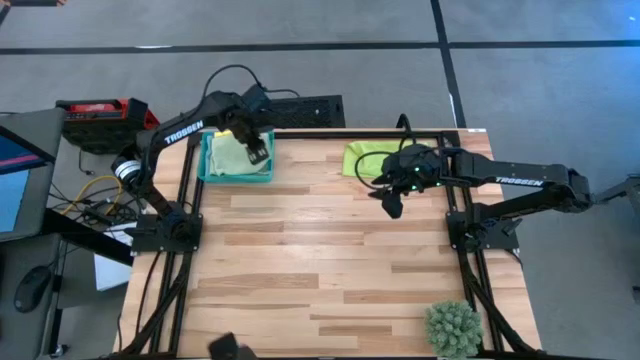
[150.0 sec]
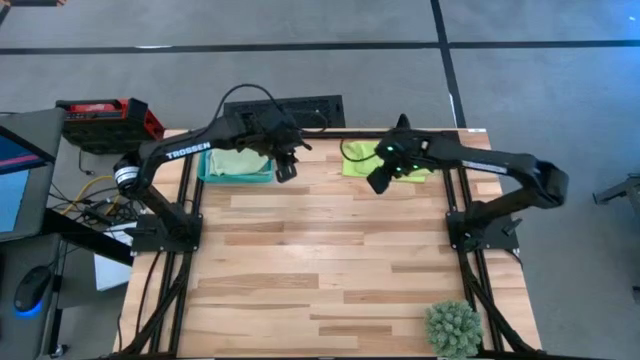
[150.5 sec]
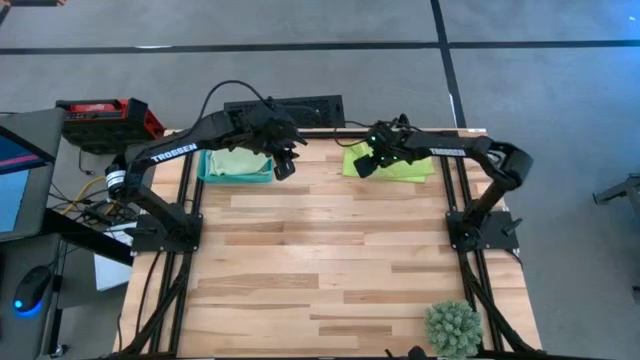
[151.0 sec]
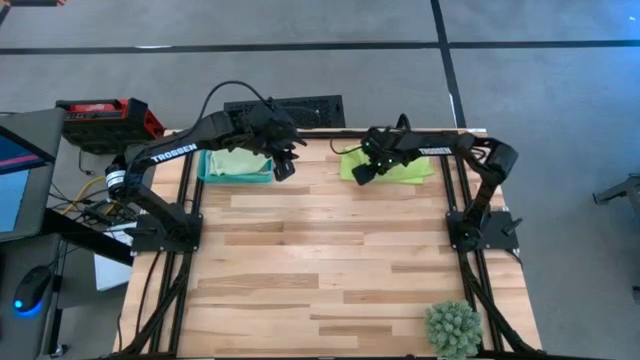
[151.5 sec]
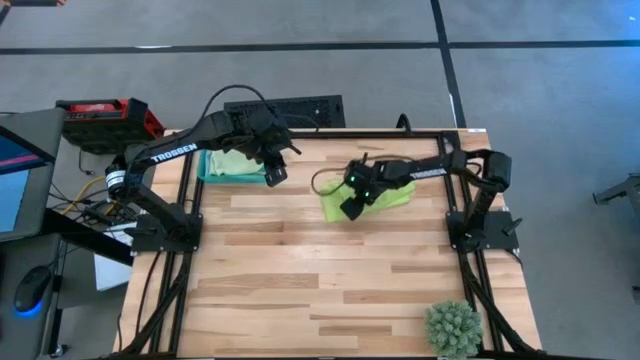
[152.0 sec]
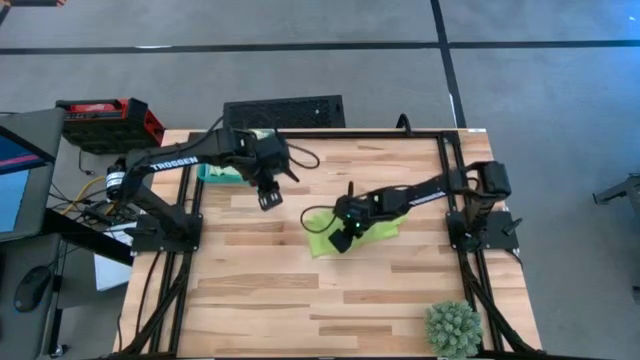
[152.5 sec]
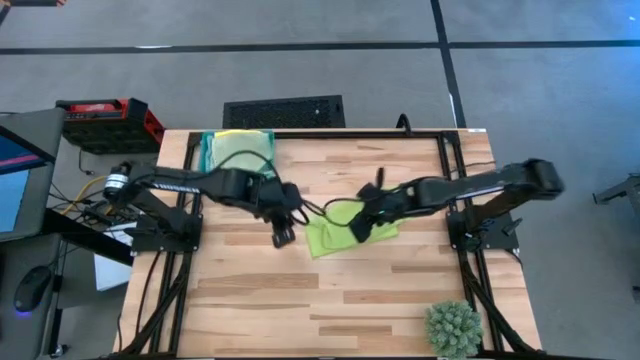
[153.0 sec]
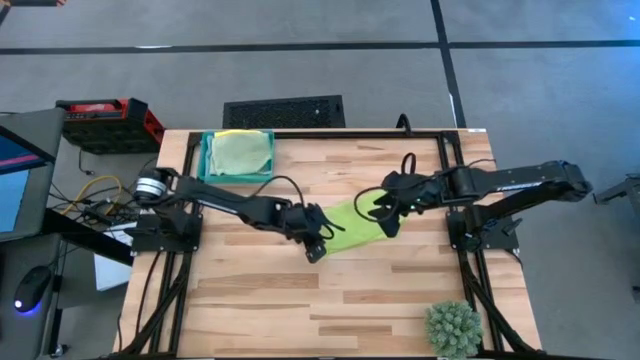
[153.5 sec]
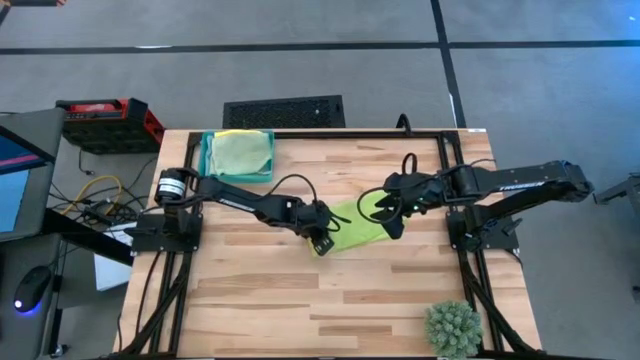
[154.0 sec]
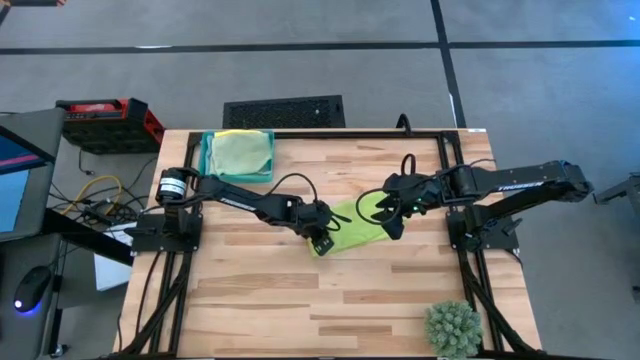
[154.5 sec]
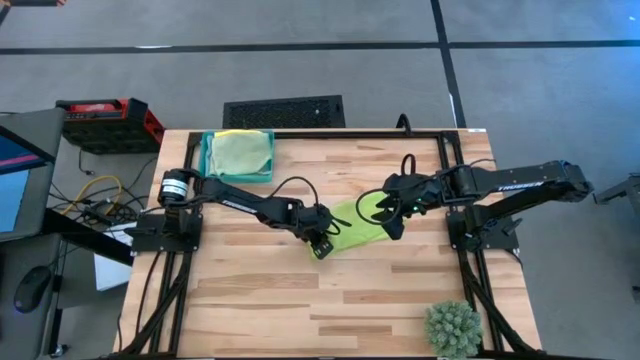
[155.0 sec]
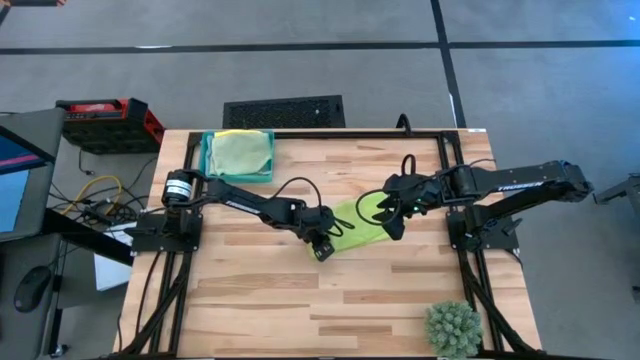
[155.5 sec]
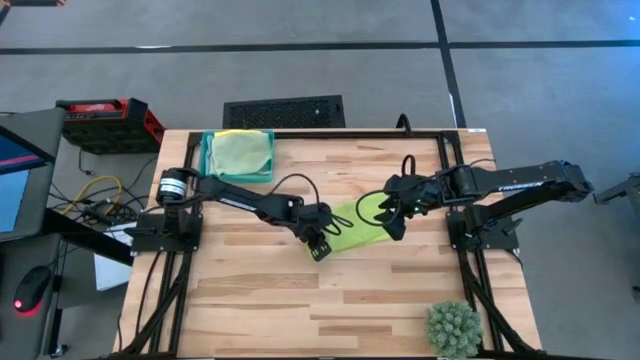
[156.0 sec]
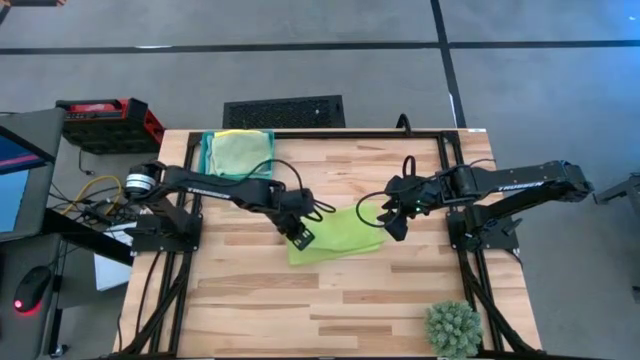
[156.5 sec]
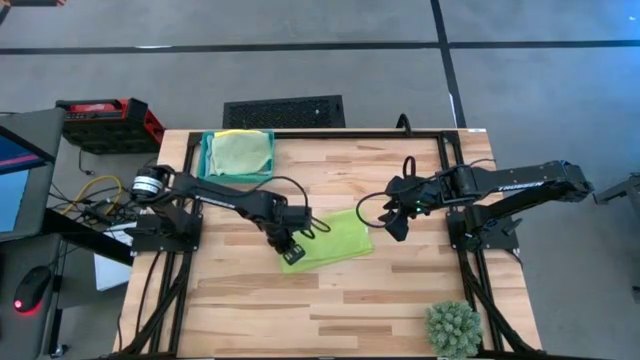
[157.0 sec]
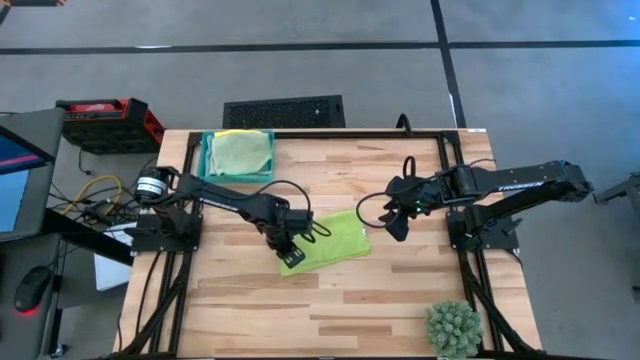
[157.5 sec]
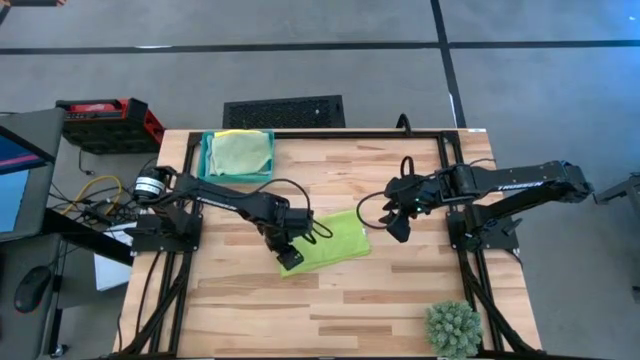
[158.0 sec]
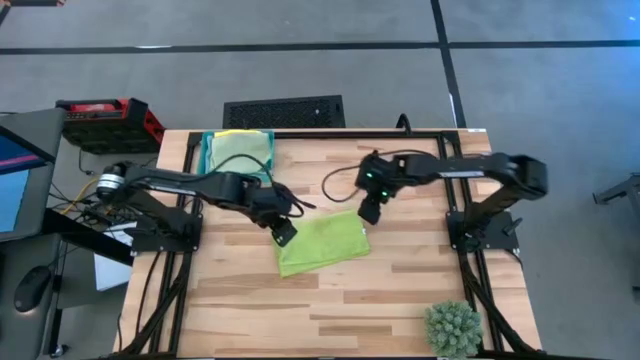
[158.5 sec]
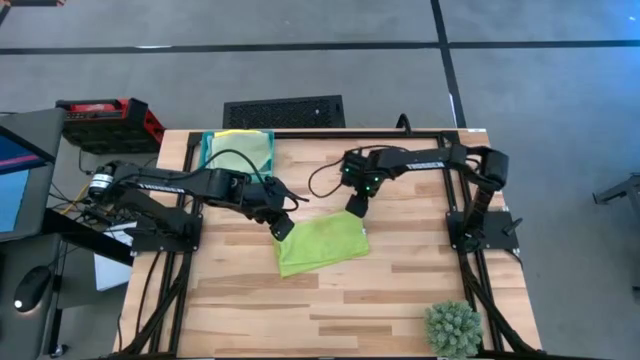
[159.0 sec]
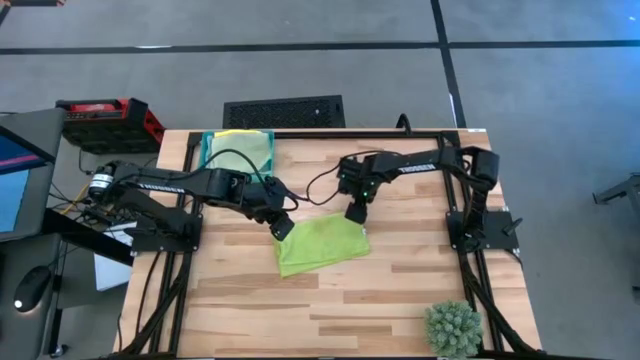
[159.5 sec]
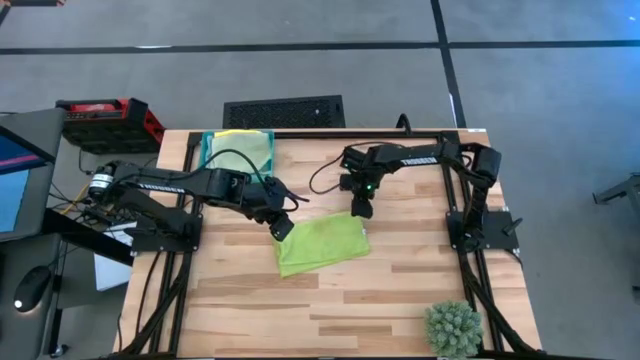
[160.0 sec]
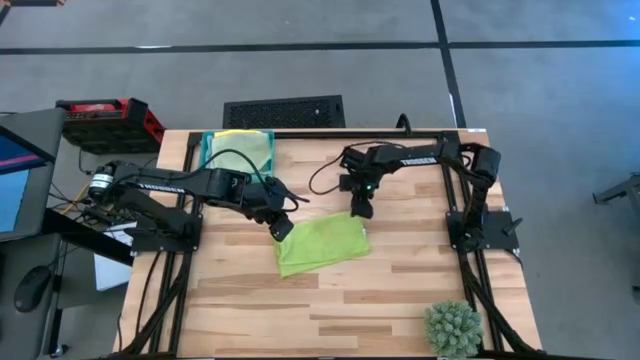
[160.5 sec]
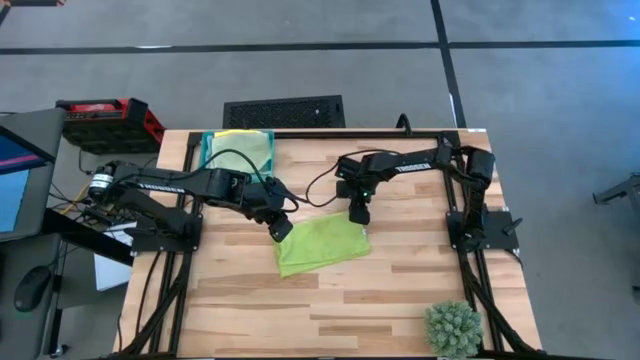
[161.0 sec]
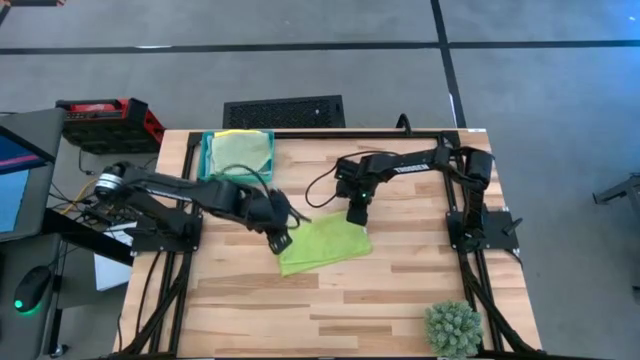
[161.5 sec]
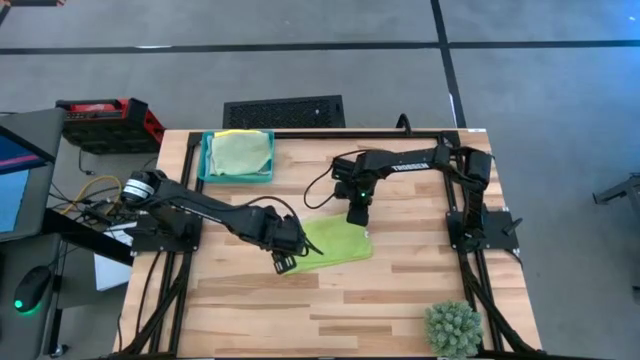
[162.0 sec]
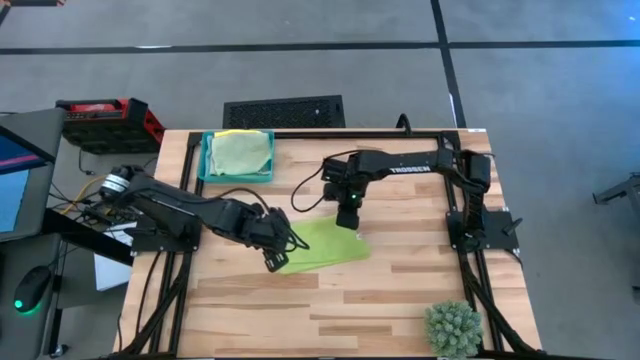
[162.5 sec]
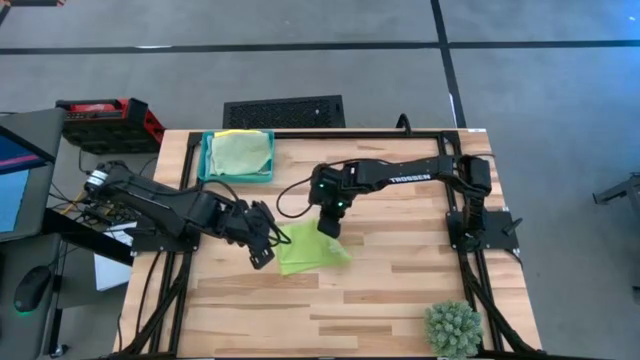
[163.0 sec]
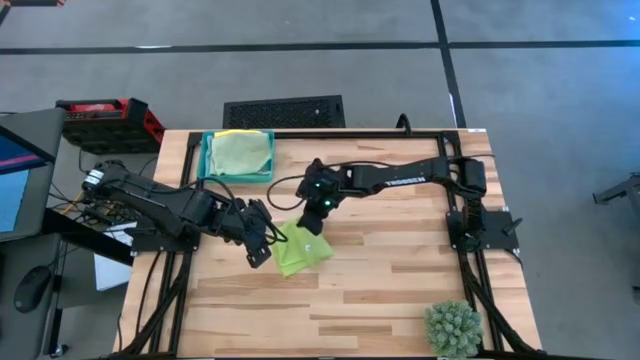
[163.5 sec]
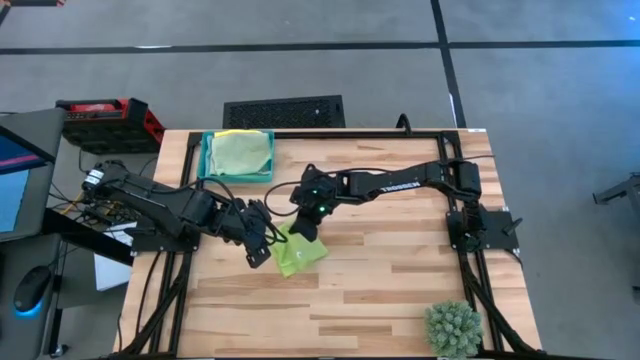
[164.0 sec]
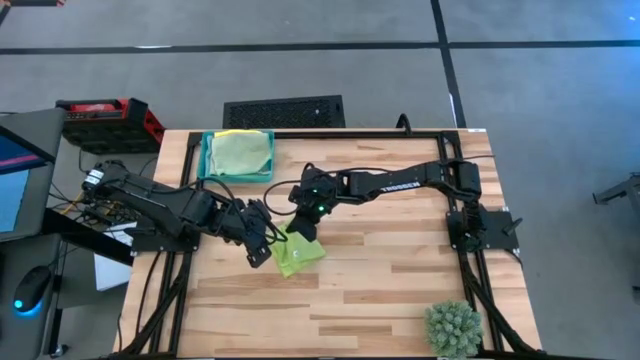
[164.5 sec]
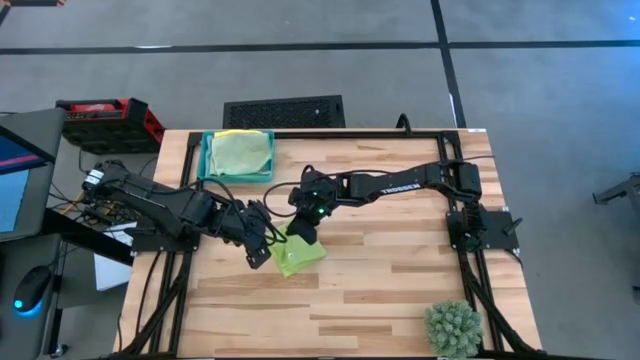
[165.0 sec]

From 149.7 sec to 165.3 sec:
Task: Fold microfiber towels
Fold the light green microfiber microfiber towel

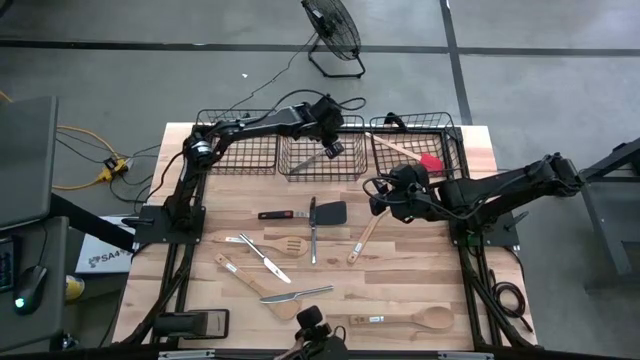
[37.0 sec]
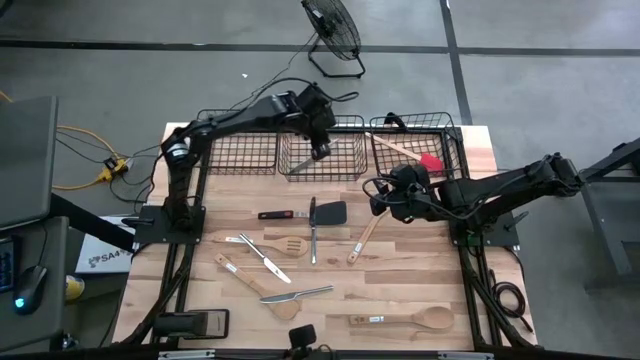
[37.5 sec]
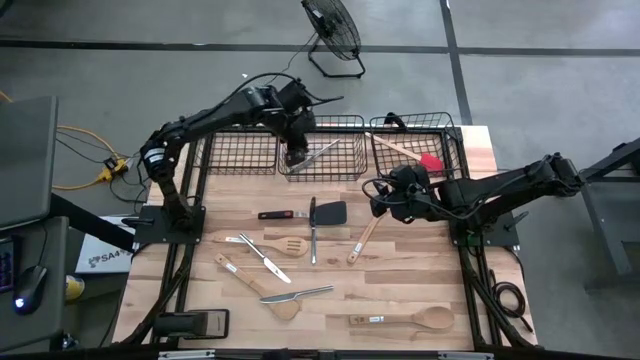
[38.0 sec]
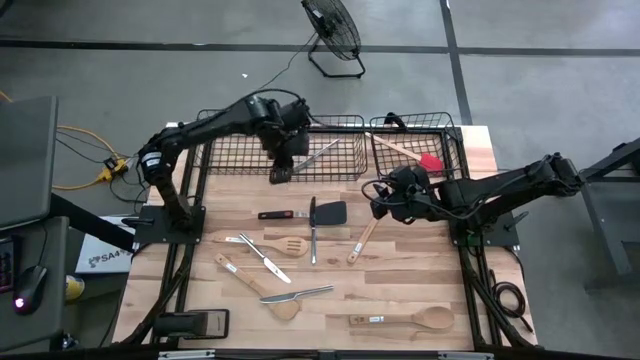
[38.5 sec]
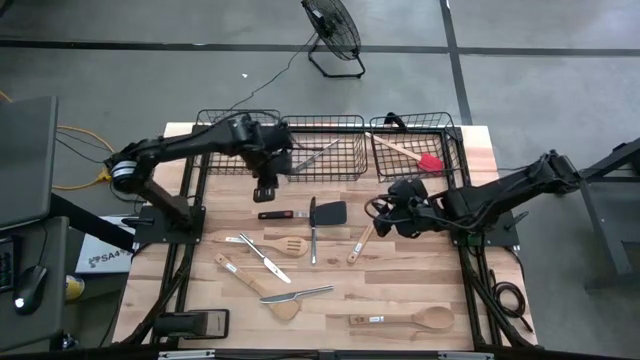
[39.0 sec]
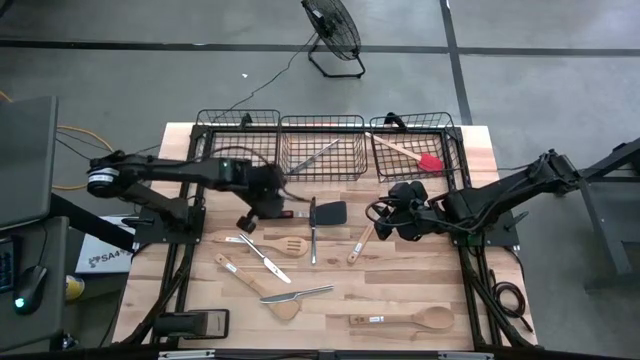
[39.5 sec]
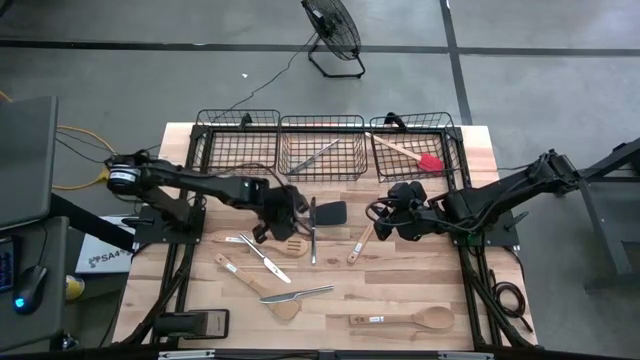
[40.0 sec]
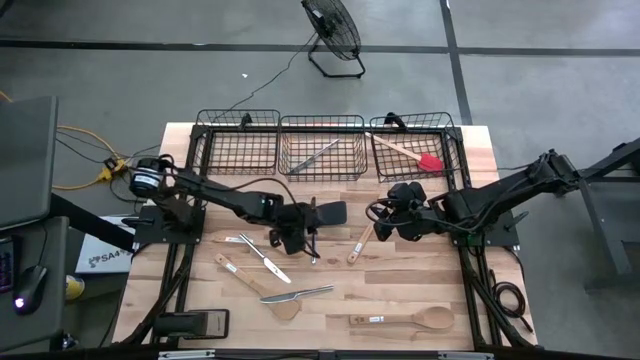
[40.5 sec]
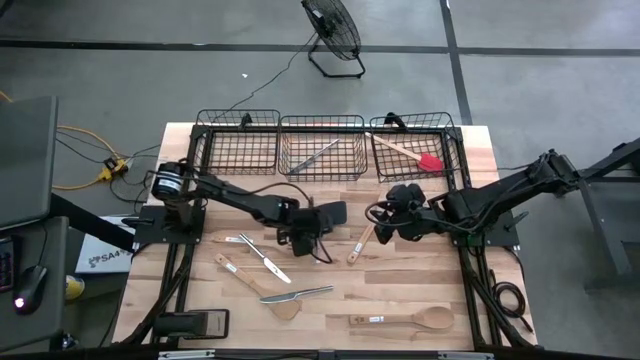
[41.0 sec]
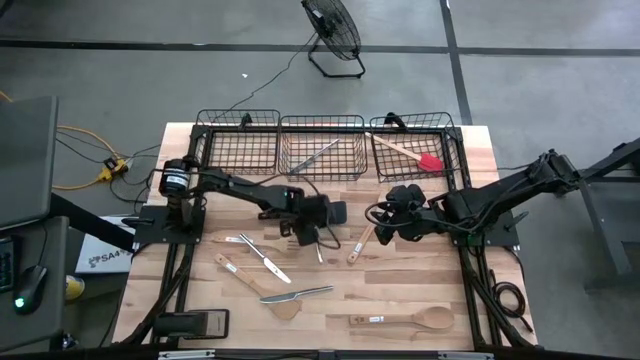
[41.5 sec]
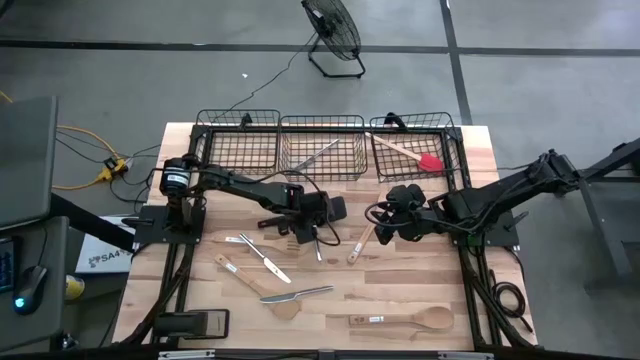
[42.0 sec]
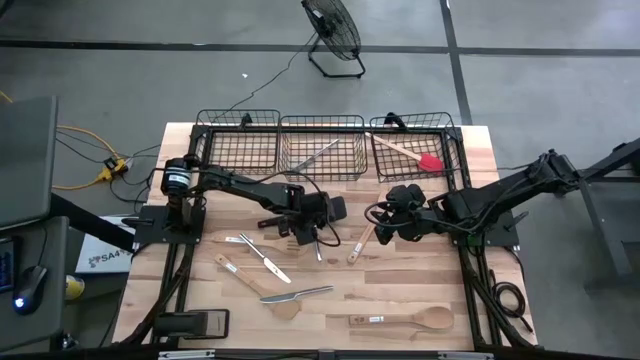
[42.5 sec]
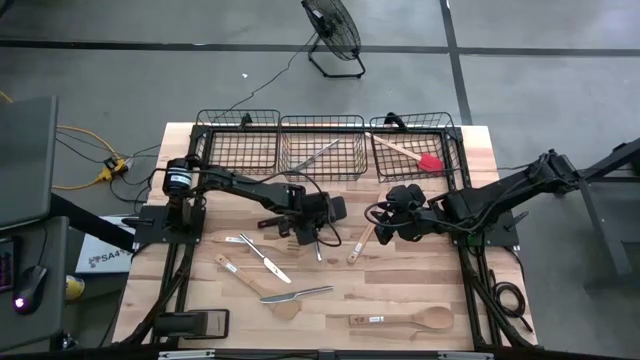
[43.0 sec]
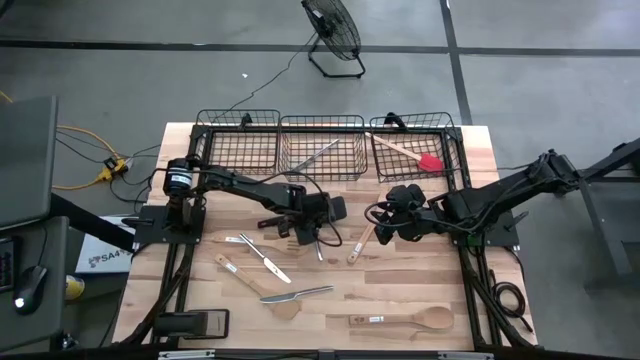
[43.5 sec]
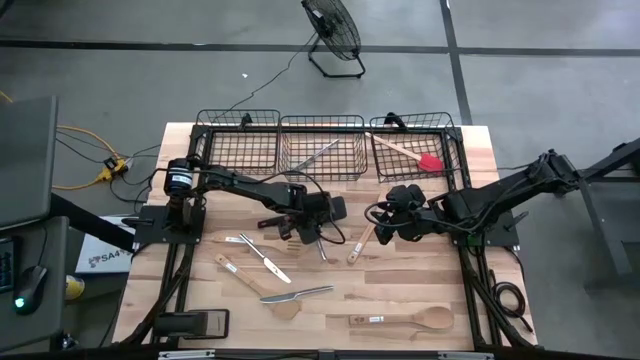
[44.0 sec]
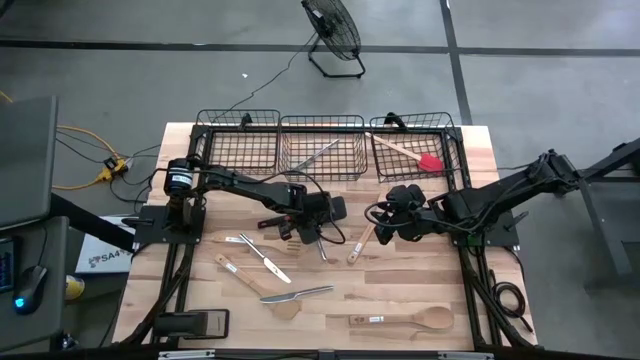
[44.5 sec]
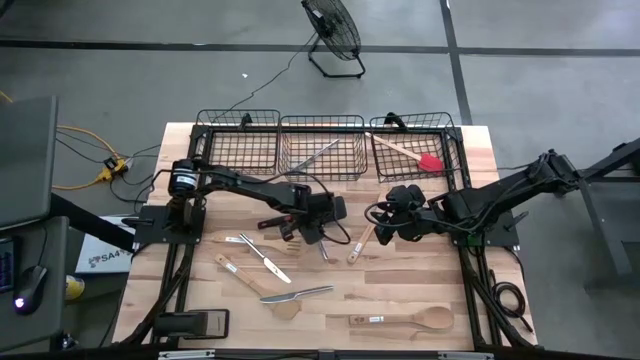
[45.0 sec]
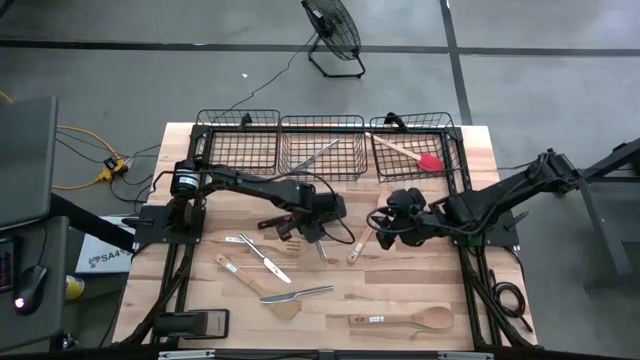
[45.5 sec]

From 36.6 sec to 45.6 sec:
Task: Pick & Place Kitchen Items
Put the silver table knife into the middle mesh basket
